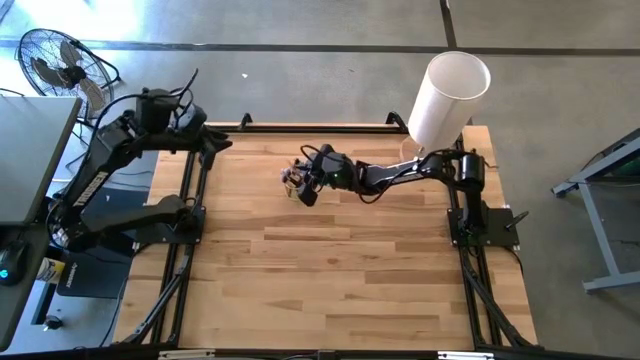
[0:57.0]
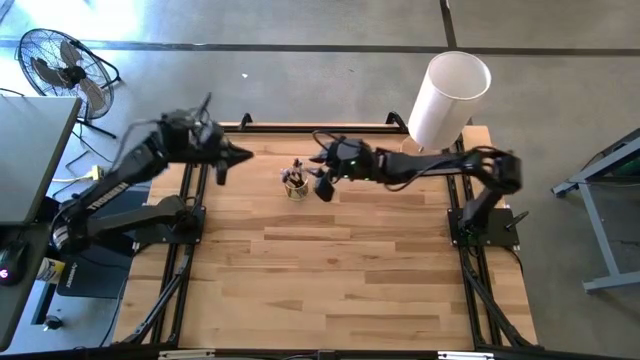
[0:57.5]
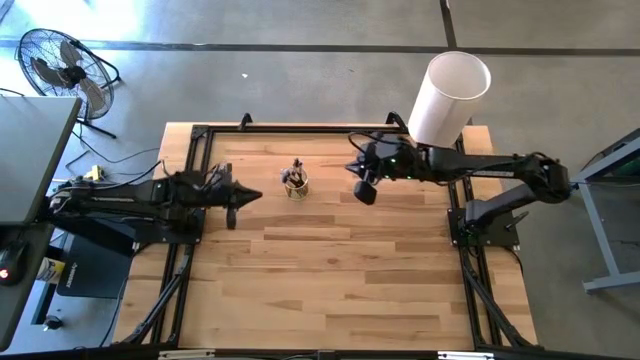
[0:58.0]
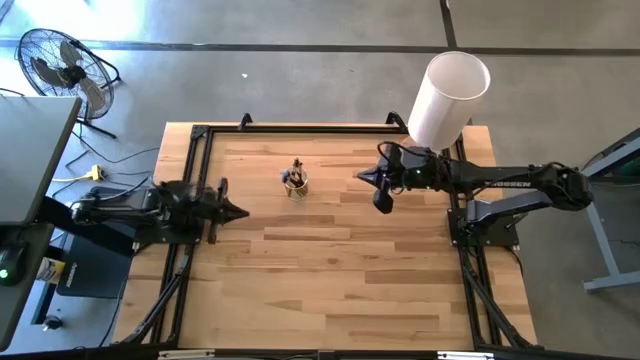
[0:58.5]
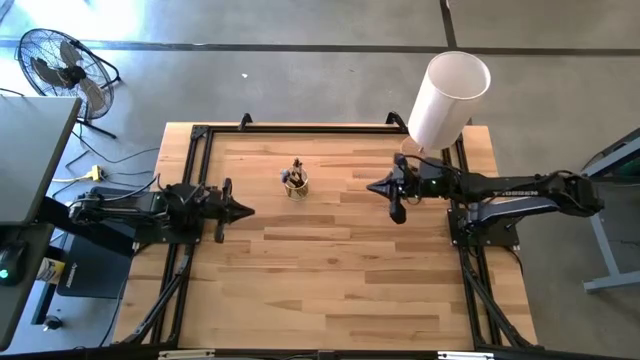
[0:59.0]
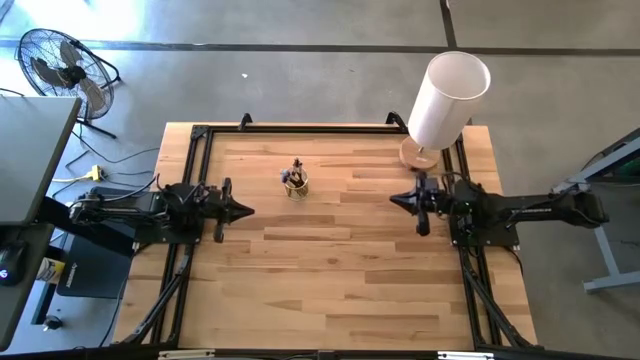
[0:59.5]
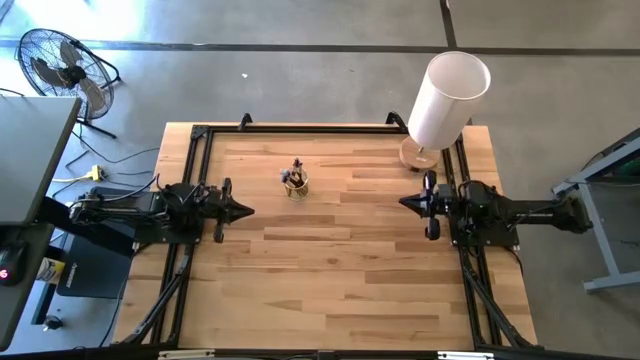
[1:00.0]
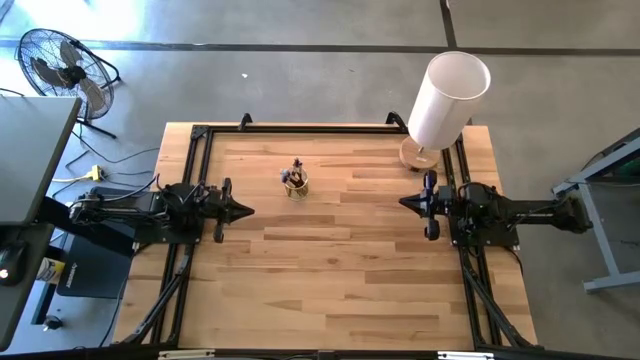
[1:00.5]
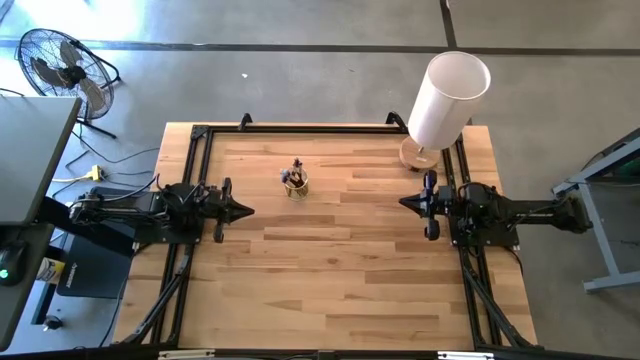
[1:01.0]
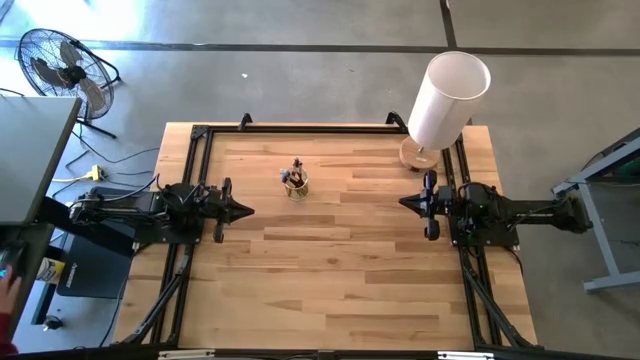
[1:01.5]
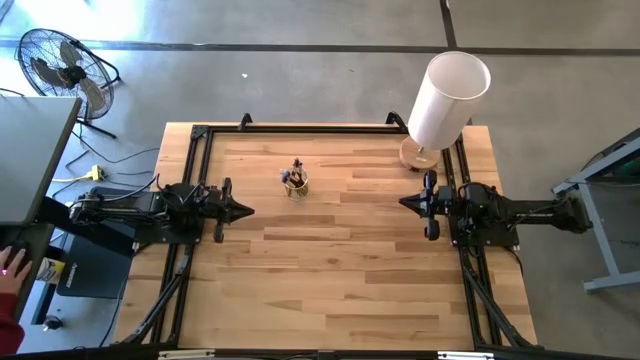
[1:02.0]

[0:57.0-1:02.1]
Task: Put items in baskets/containers
Return to Home Position

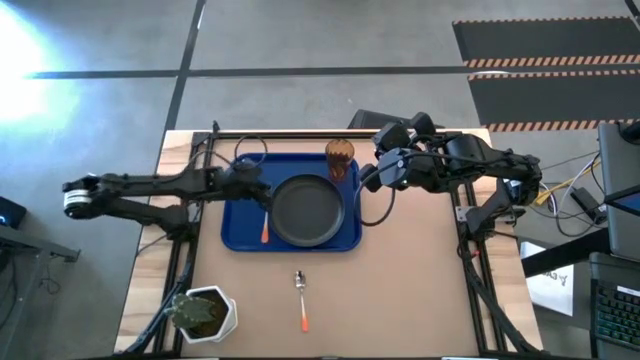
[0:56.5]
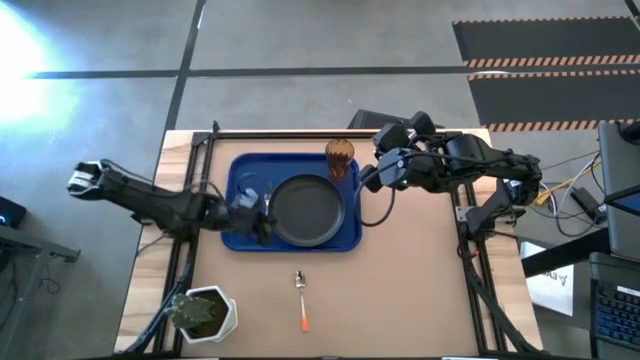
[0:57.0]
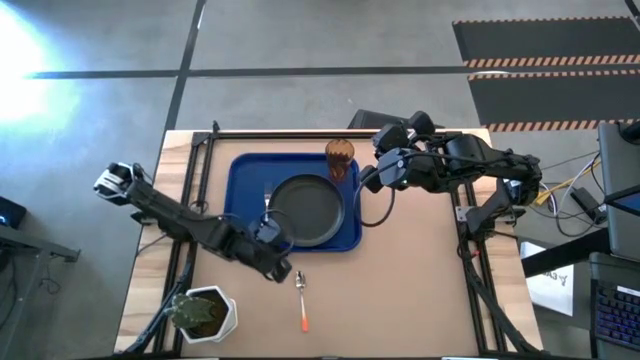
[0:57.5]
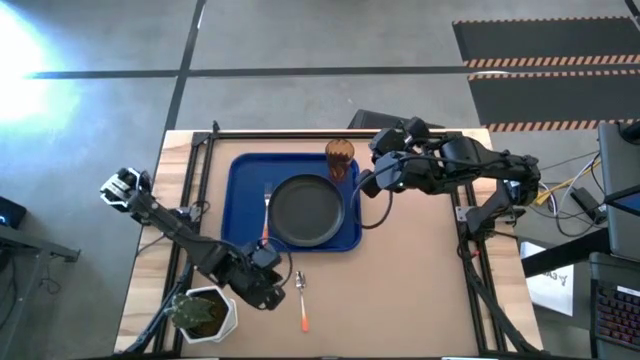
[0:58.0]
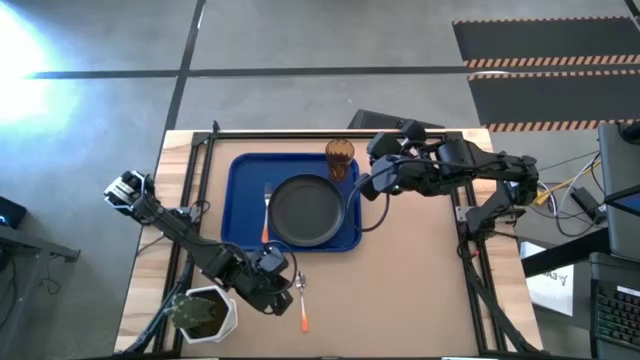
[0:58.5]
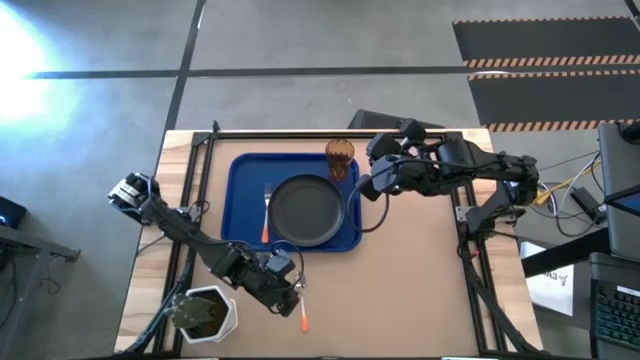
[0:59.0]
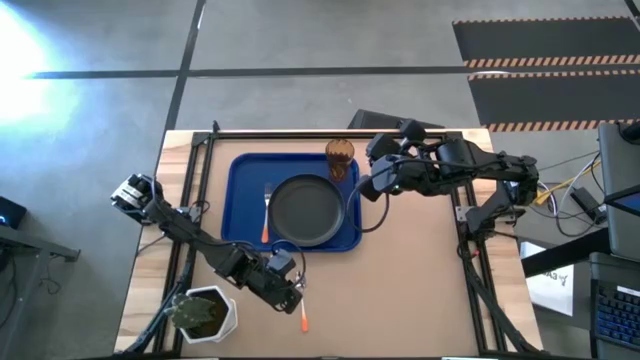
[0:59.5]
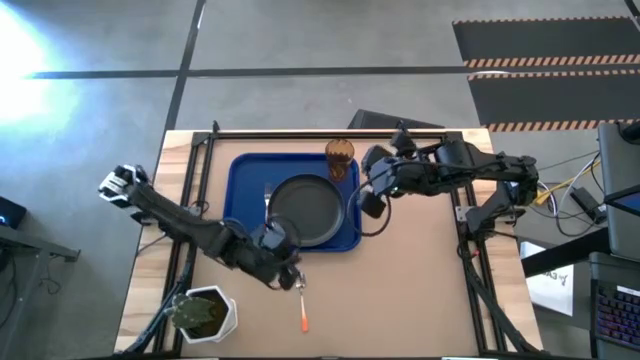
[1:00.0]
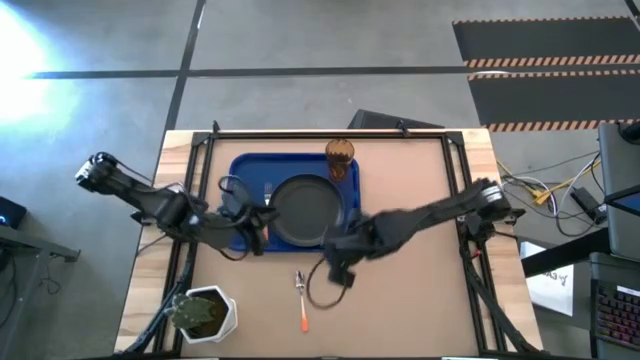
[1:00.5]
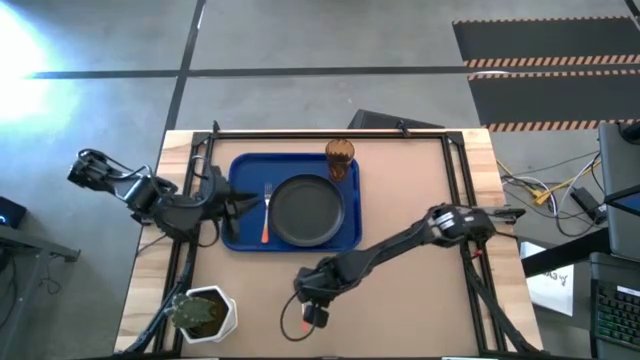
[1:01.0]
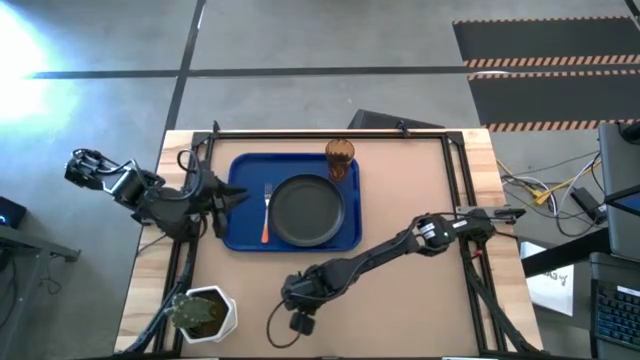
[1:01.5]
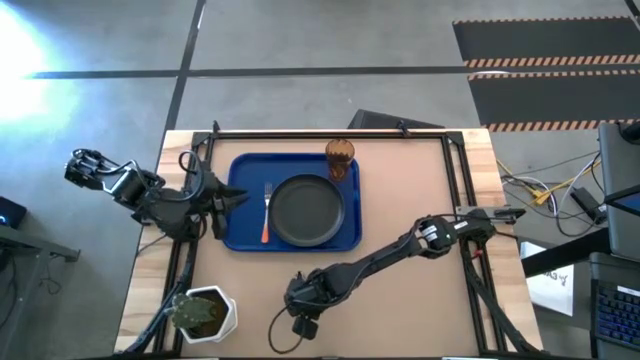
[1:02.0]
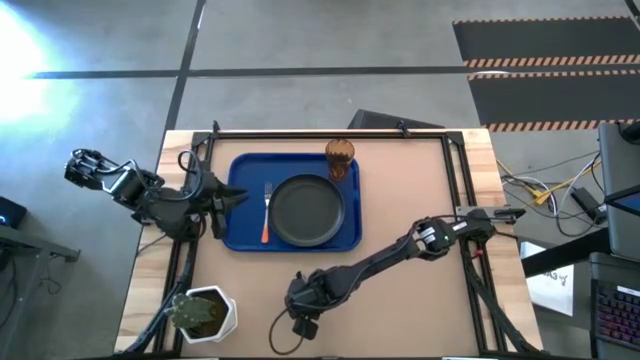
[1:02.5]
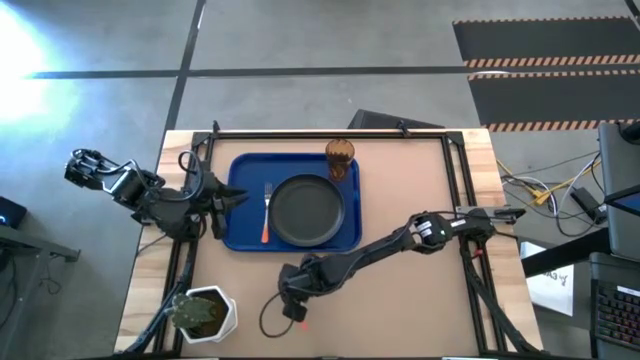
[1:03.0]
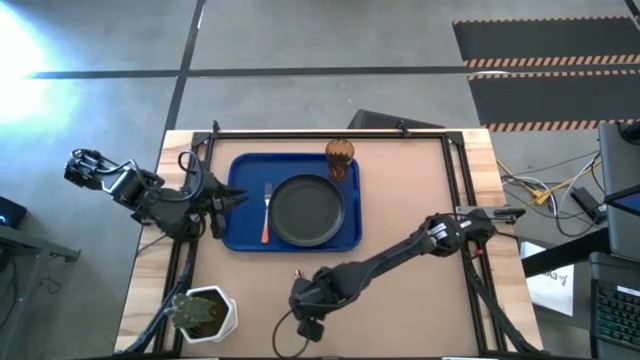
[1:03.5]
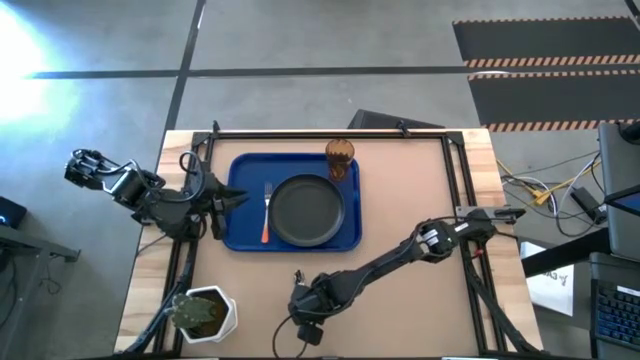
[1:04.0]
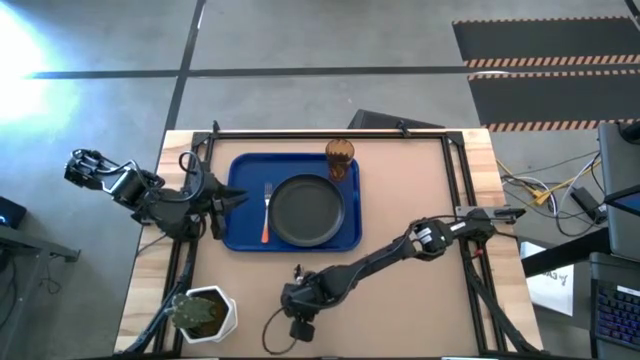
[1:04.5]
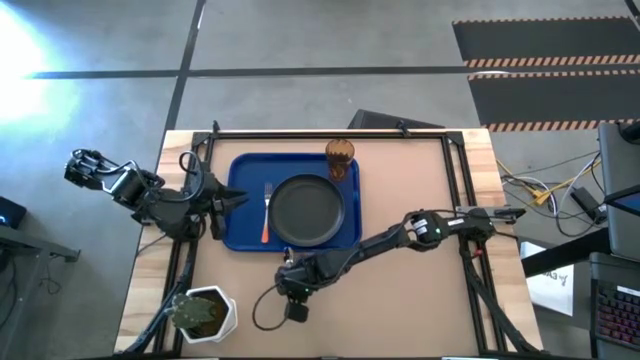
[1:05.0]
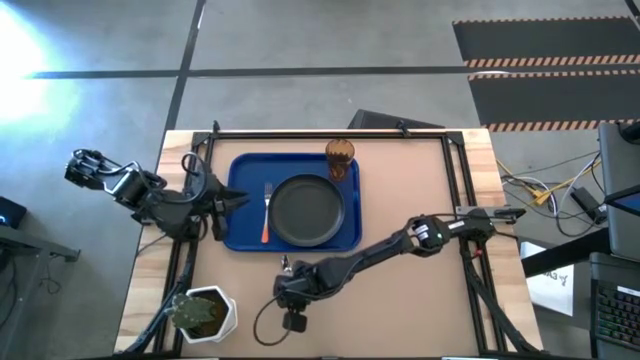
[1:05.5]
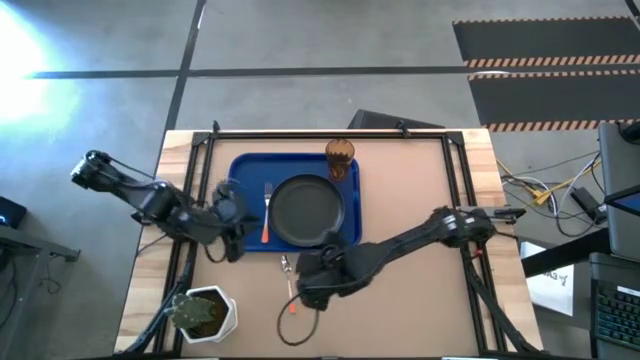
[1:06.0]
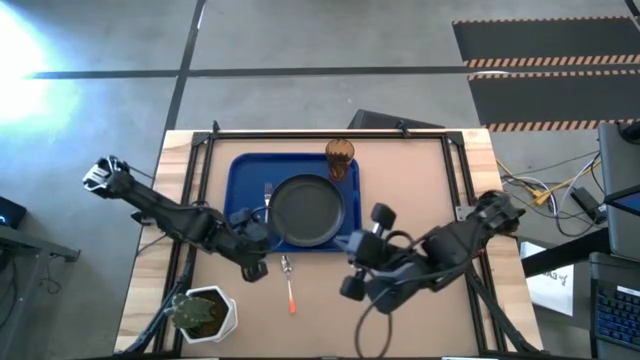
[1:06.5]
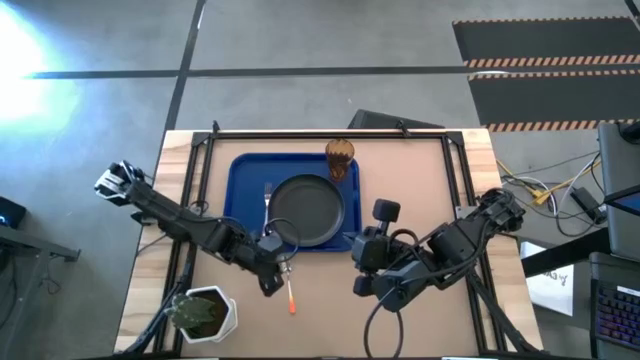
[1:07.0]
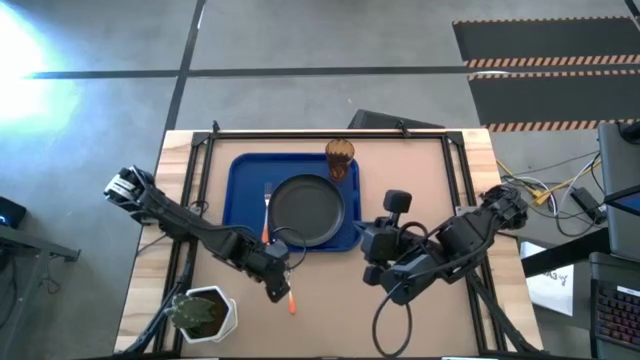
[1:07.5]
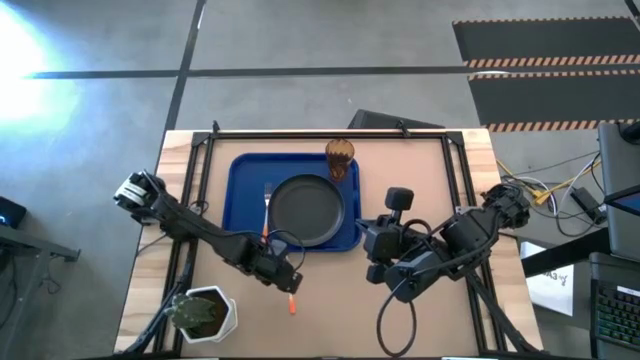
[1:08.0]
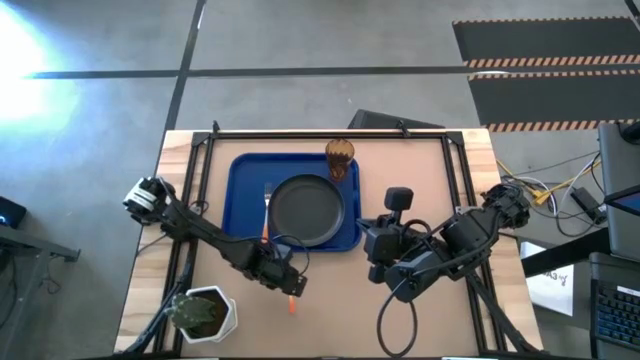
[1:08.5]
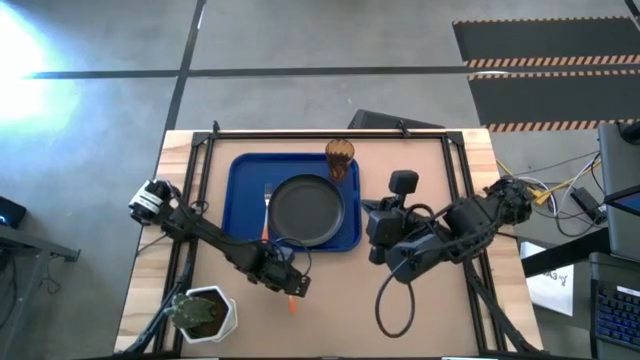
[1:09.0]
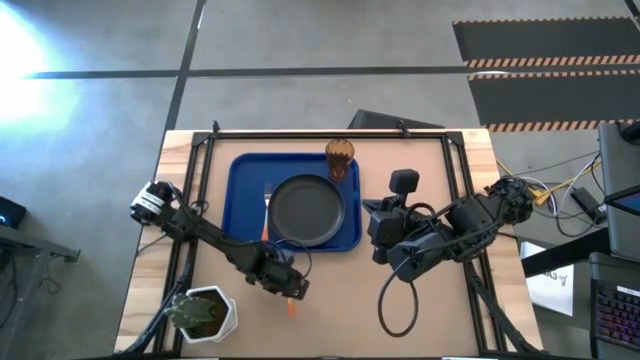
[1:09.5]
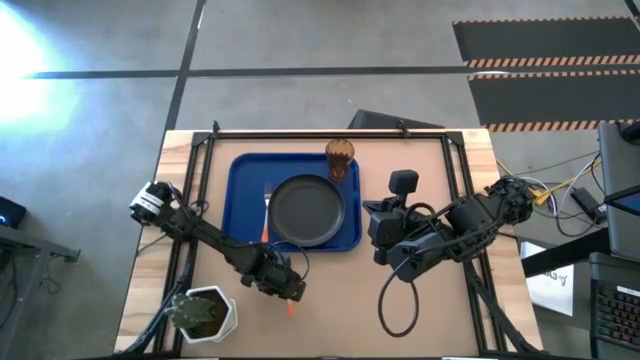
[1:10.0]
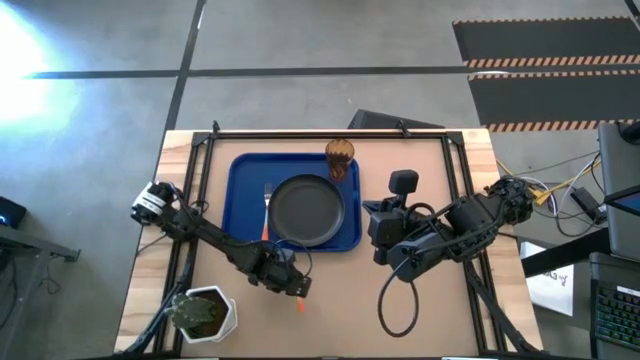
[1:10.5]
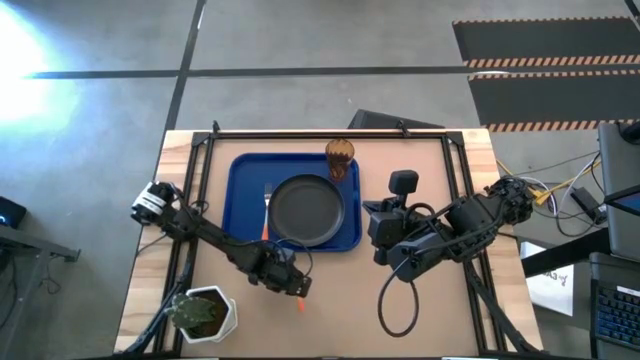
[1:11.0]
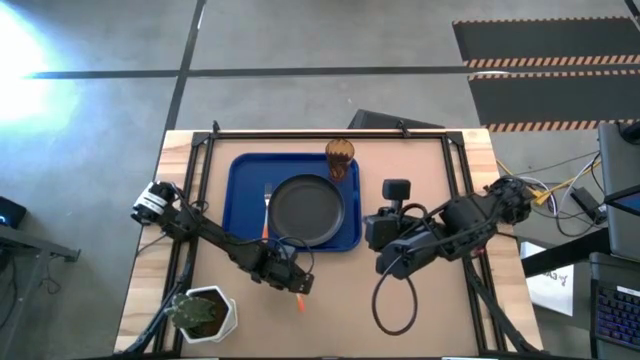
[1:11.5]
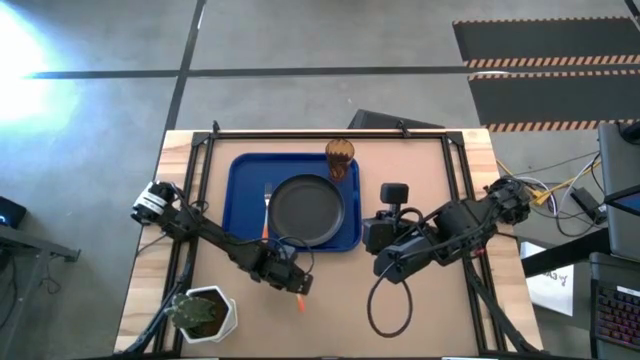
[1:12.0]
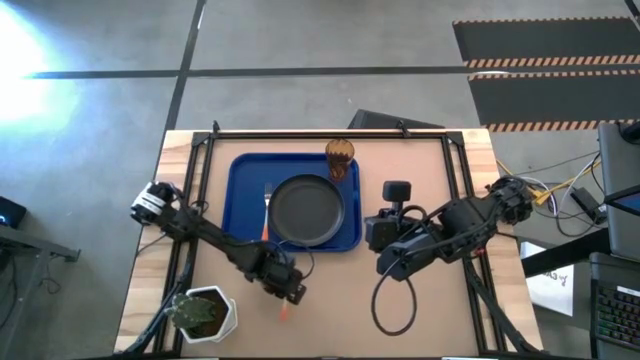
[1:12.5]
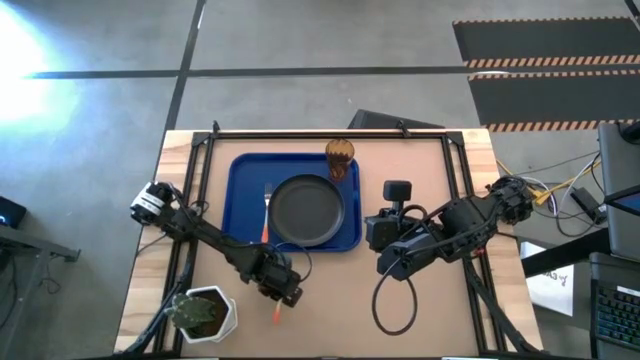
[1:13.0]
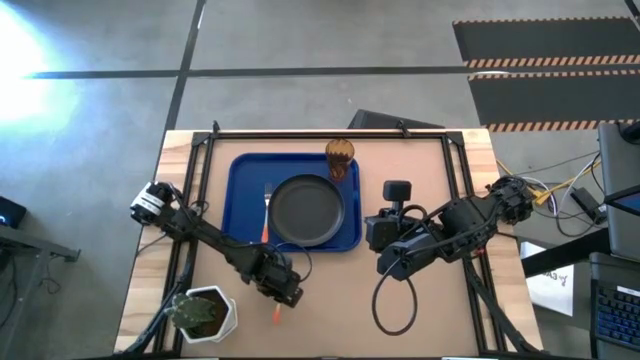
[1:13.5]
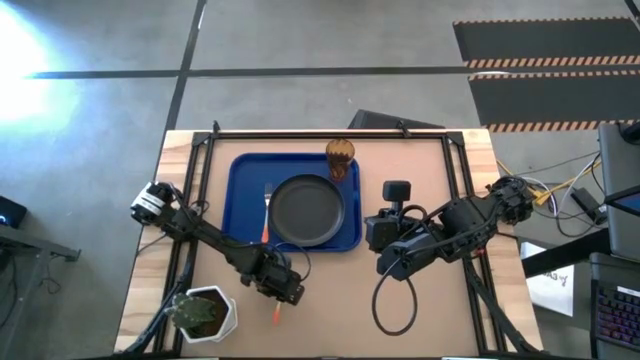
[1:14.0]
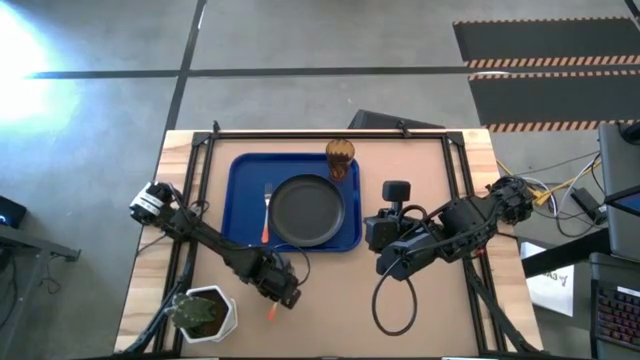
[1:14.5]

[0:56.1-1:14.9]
Task: Pick and place plate/cup/fork/spoon on tray
Put the orange spoon beside the fork on the blue tray
